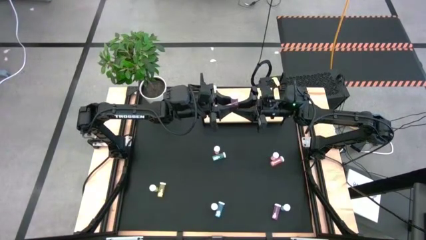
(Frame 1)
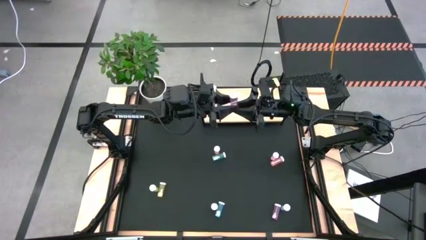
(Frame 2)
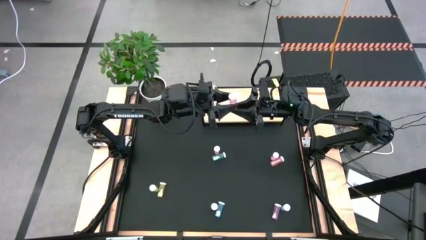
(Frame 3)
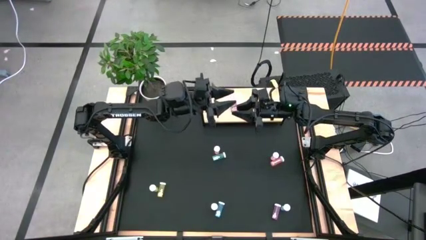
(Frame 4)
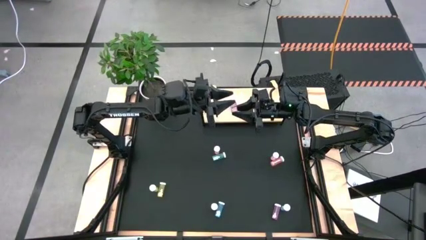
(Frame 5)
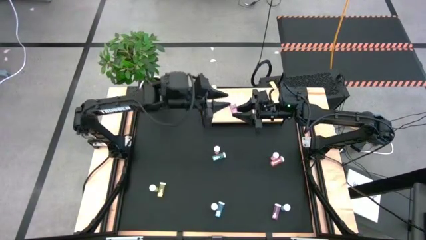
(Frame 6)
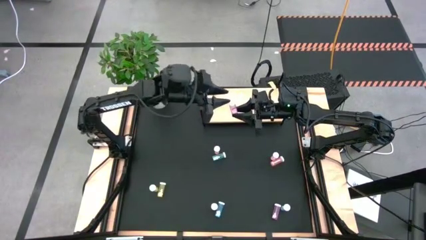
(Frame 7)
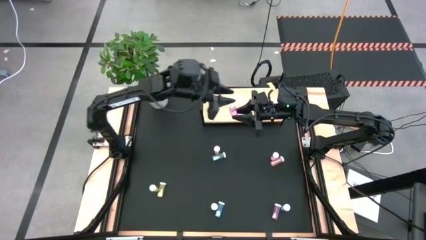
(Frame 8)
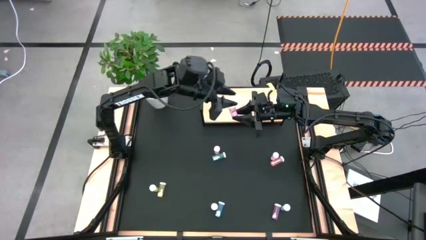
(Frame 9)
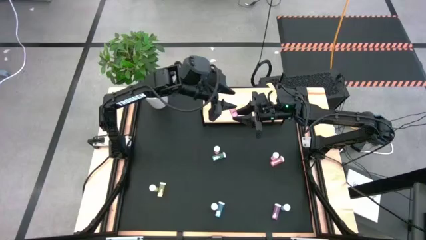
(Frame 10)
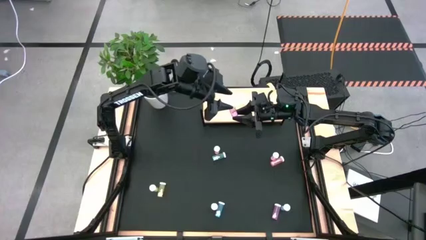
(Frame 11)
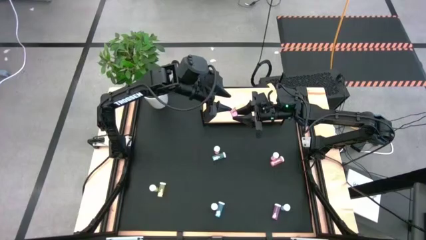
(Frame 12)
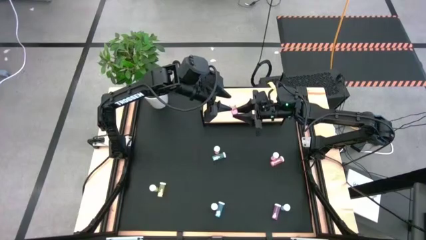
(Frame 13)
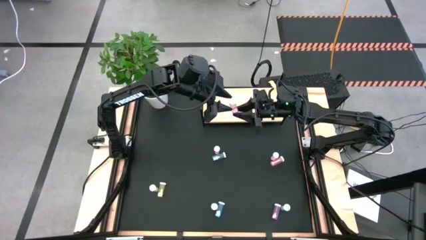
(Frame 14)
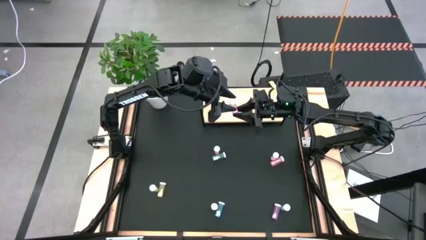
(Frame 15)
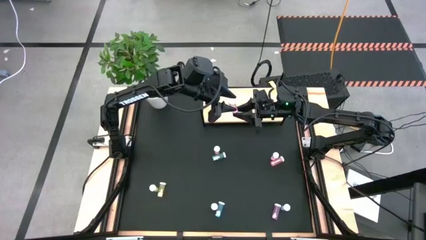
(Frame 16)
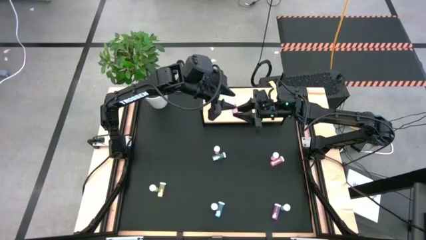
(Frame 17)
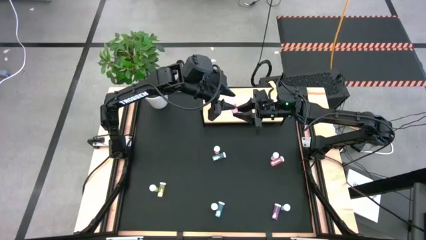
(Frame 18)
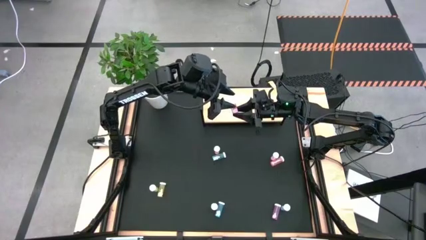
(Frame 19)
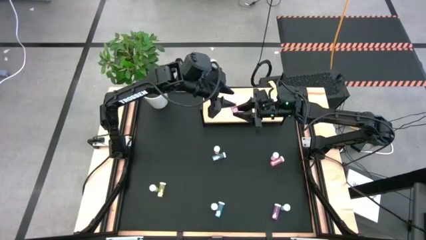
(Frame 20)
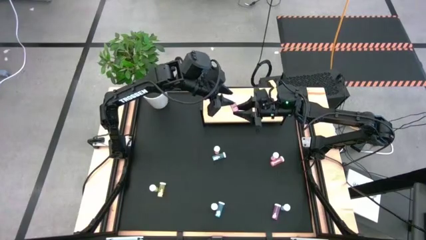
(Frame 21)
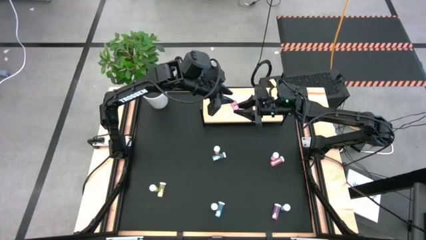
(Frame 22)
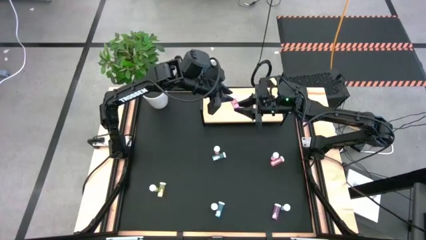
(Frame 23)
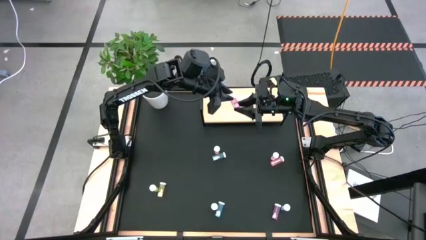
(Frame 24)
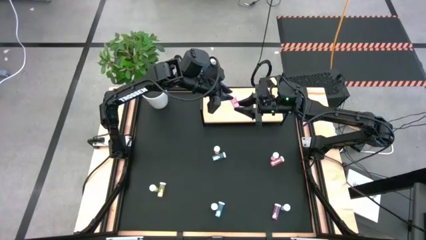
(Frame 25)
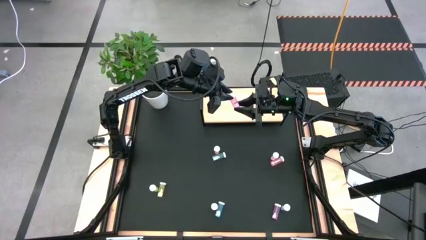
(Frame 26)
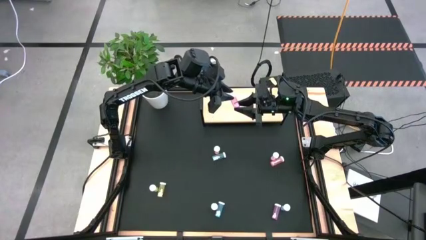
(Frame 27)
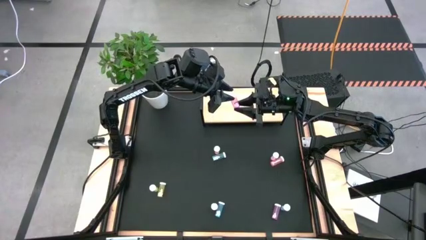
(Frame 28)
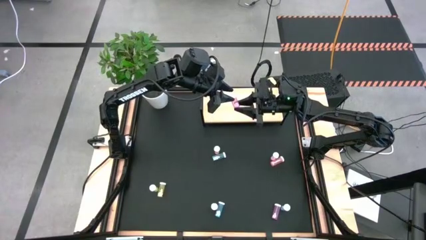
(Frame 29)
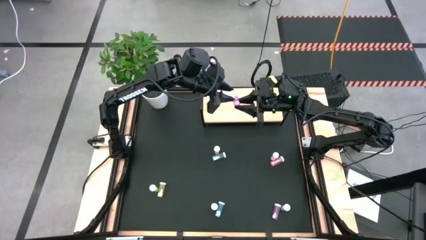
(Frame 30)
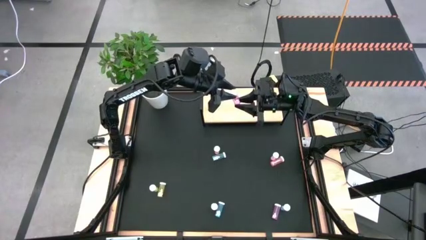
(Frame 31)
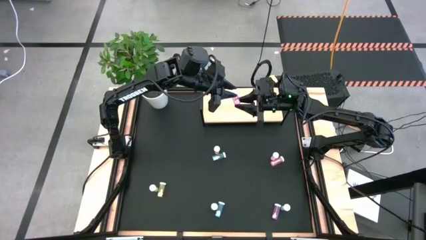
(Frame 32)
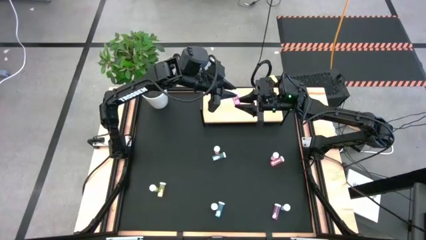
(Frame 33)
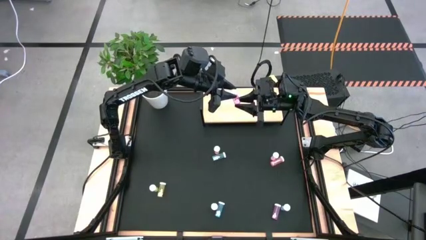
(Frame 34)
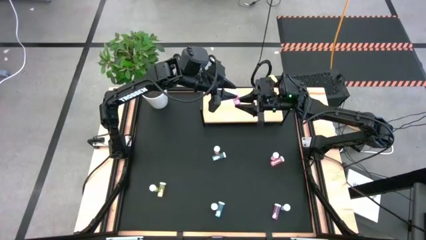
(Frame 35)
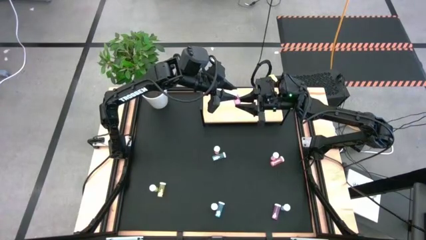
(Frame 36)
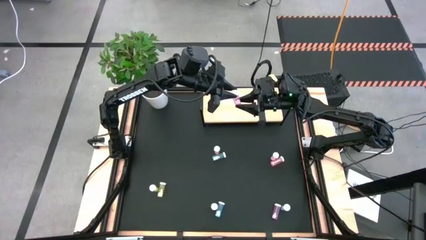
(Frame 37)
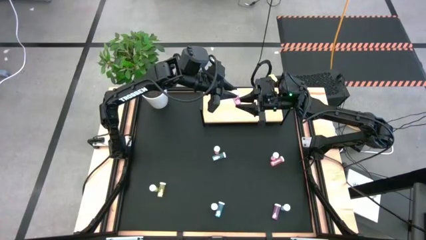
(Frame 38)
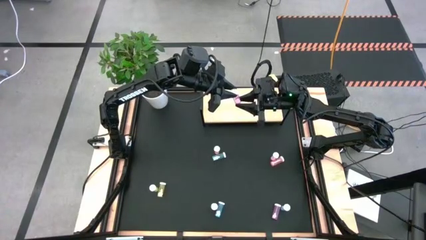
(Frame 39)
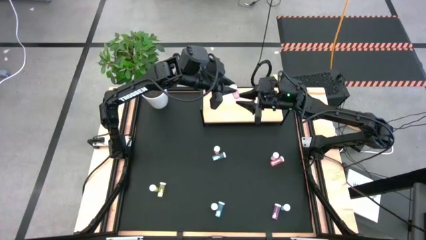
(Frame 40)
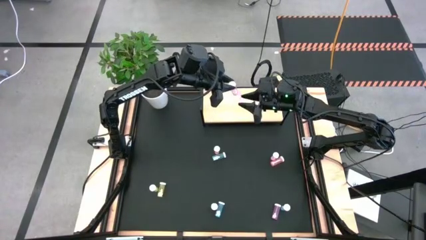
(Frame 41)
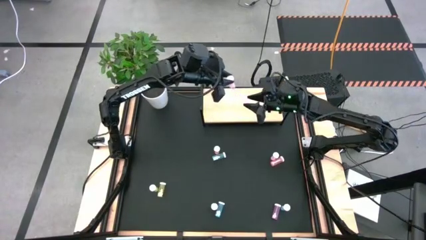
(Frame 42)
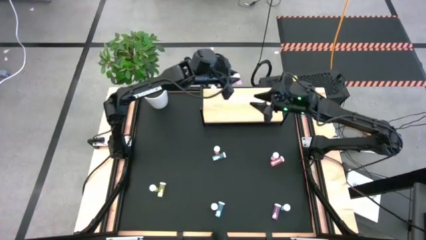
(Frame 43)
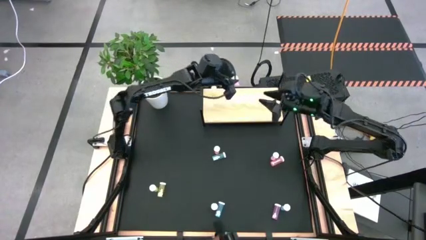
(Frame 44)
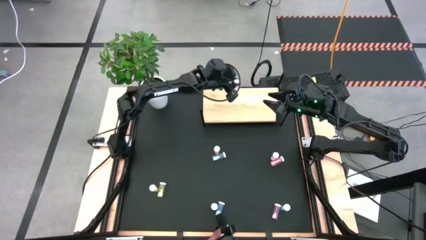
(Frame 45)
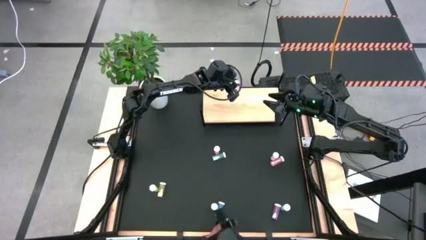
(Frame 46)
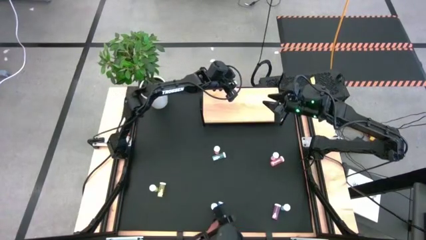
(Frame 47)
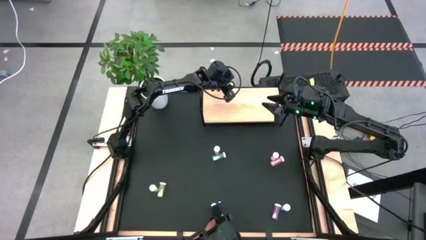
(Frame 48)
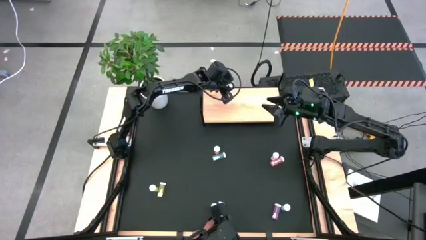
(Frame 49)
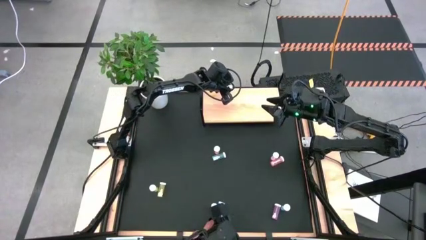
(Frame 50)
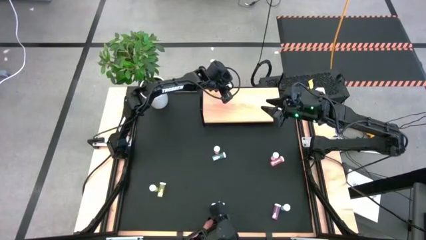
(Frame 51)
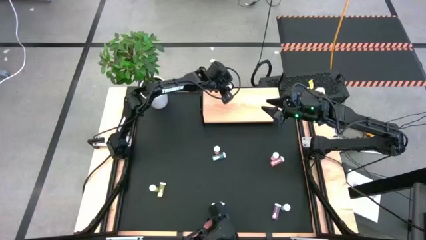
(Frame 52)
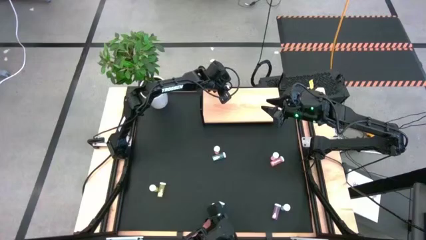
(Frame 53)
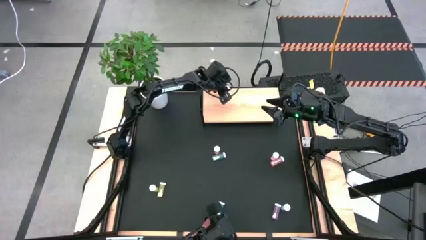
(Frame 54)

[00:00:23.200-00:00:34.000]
Task: Pick and place medicine bottles onto shelf by color
Put the top left pink pill bottle on the shelf

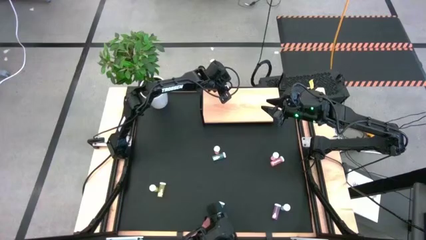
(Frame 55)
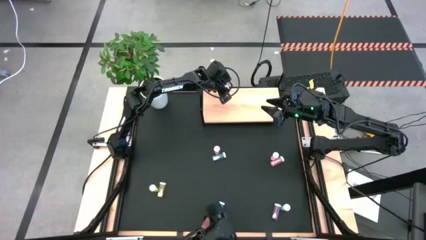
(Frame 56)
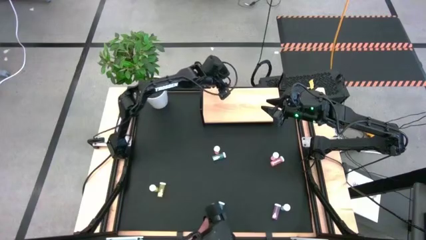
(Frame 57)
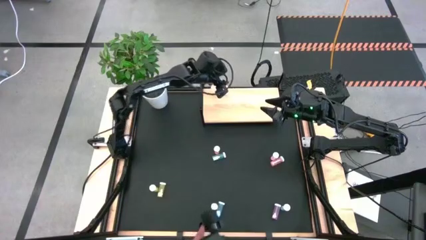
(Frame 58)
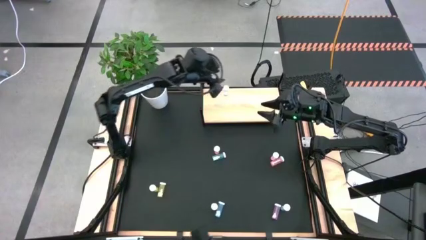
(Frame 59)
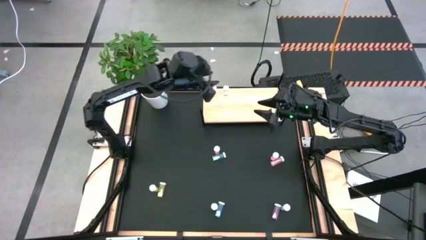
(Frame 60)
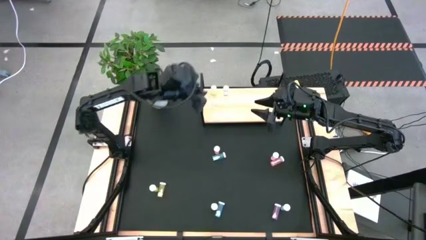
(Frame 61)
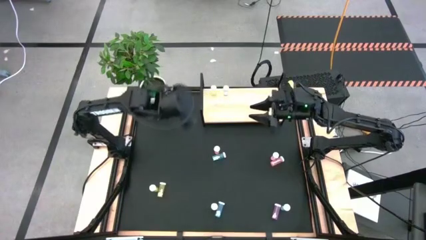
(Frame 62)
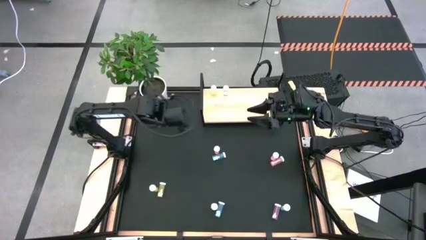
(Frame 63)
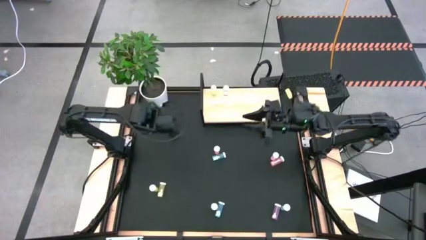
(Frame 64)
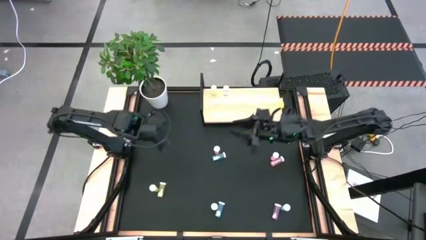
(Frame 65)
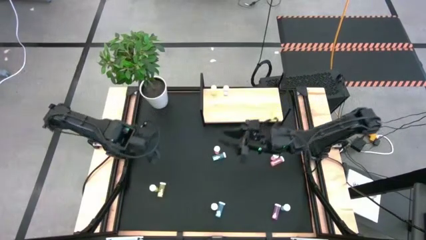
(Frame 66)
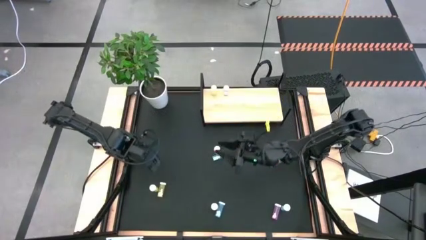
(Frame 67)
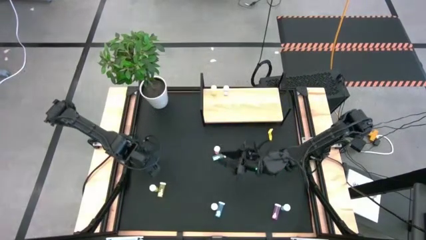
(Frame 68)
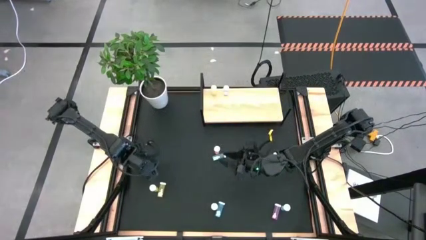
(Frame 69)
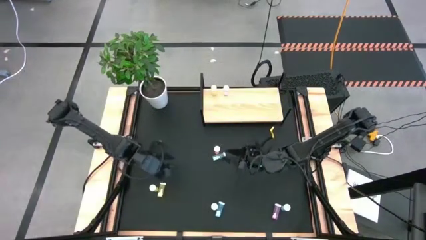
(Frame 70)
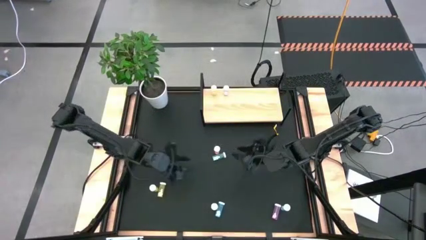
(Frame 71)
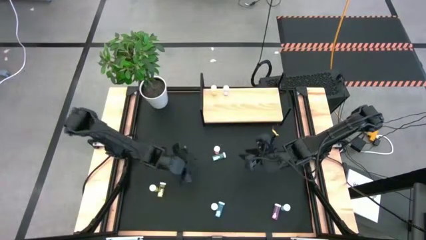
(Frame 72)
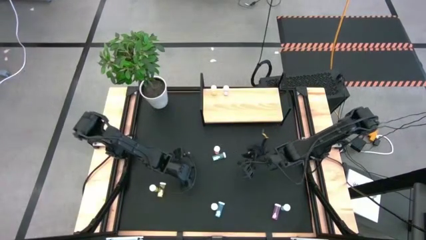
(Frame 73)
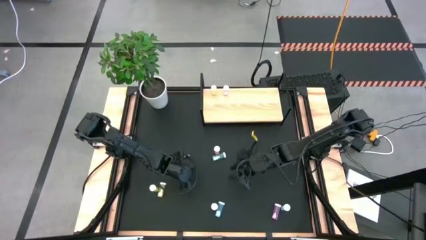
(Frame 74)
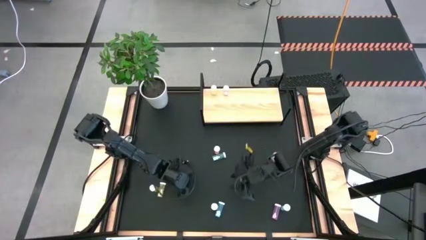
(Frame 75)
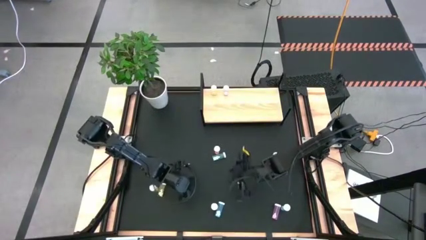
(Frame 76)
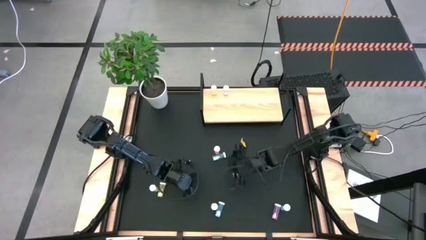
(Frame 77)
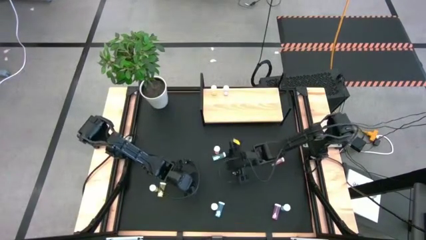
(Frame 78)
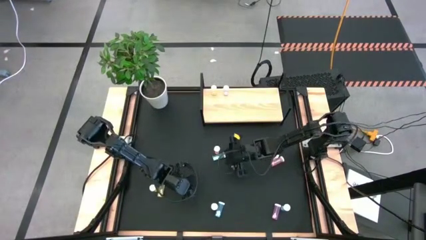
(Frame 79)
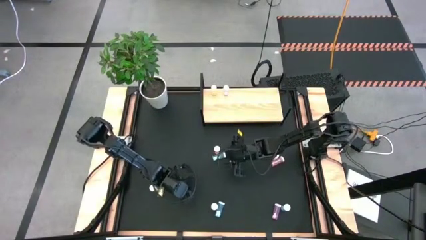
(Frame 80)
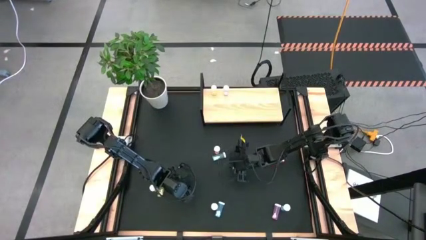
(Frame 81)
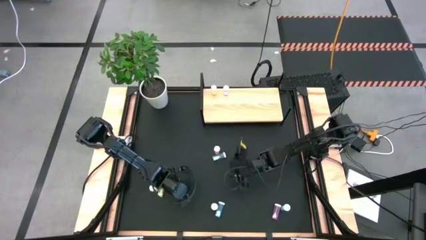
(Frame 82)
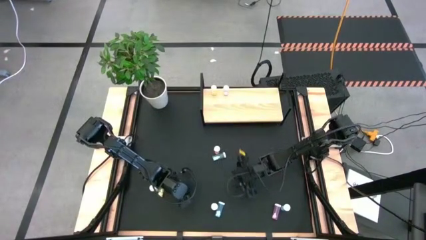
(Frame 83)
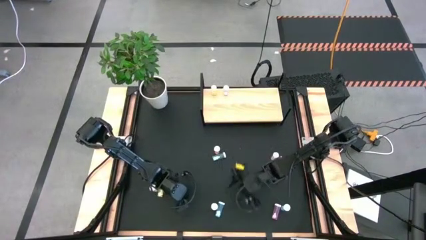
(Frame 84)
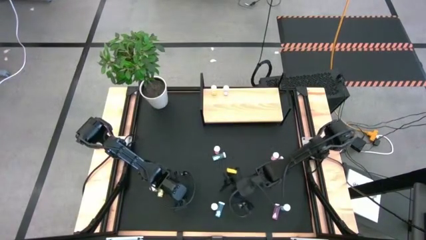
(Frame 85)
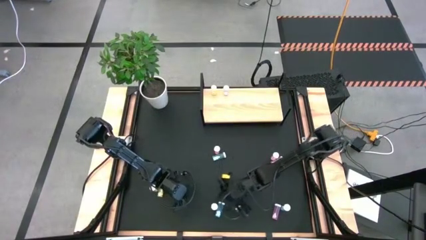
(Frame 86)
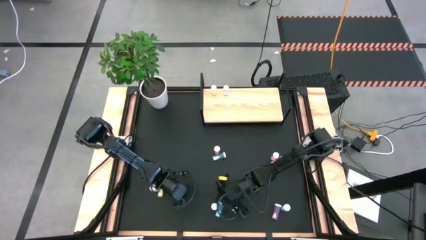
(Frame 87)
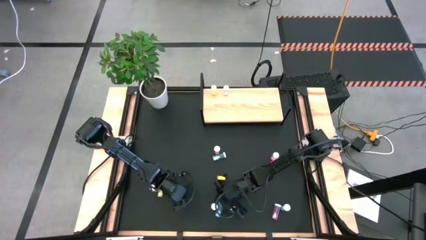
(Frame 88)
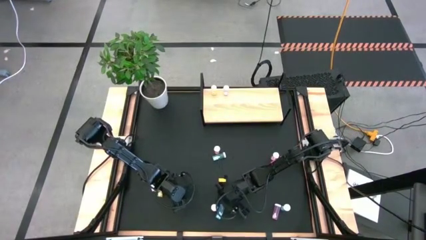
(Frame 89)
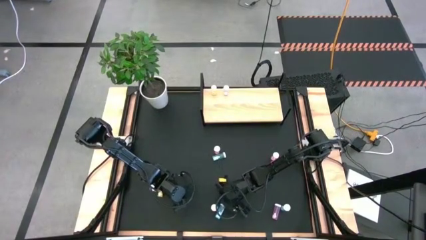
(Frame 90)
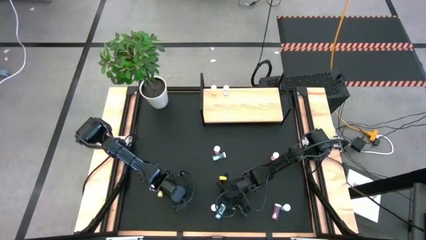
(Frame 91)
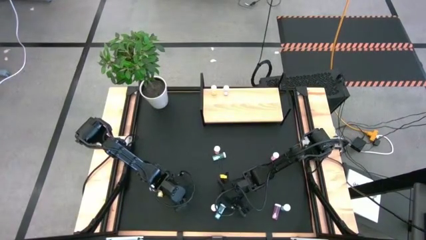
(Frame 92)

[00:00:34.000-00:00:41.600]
Put the bottom left blue pill bottle on the shelf
